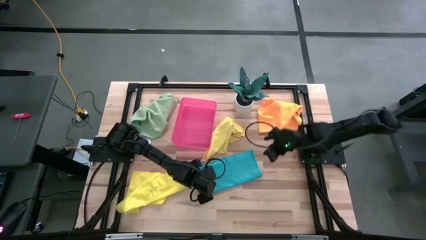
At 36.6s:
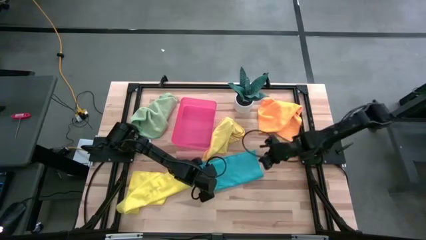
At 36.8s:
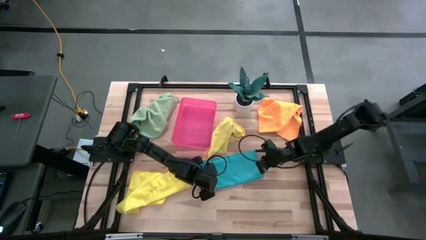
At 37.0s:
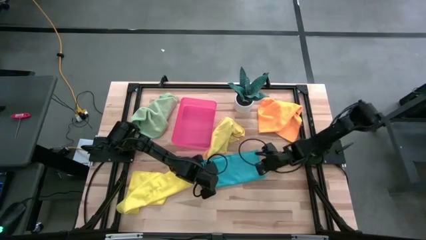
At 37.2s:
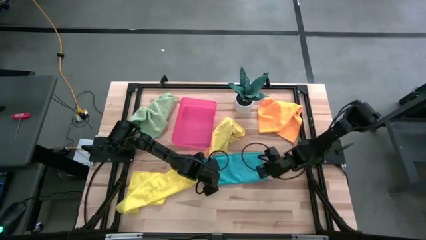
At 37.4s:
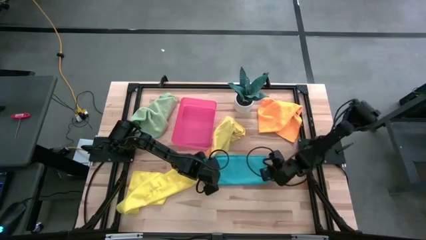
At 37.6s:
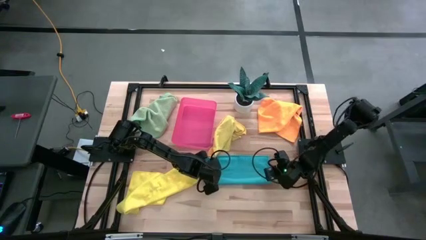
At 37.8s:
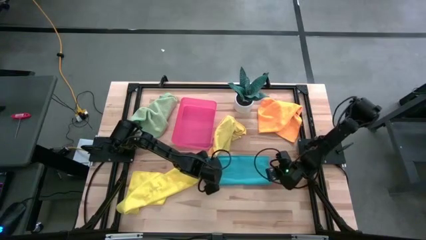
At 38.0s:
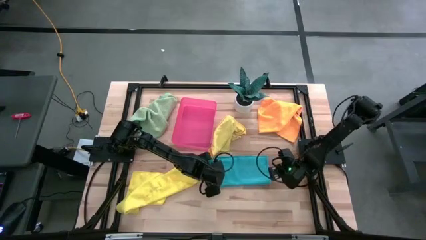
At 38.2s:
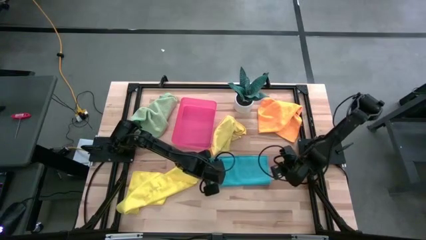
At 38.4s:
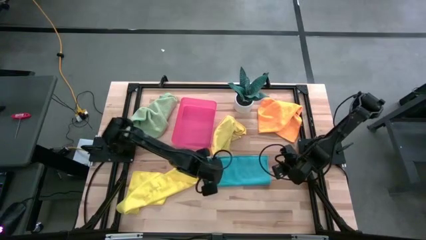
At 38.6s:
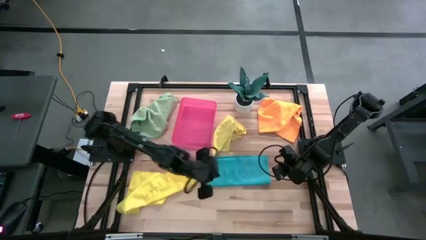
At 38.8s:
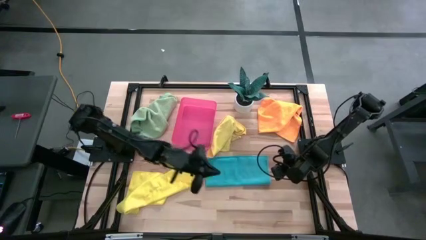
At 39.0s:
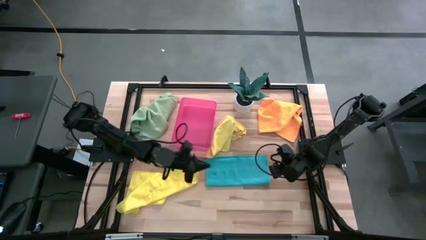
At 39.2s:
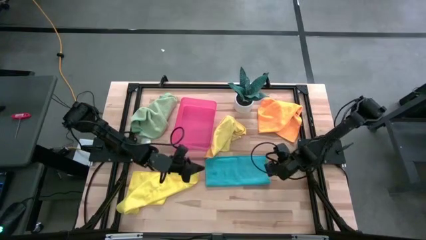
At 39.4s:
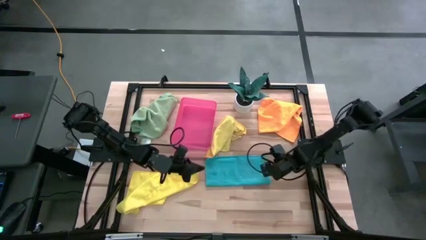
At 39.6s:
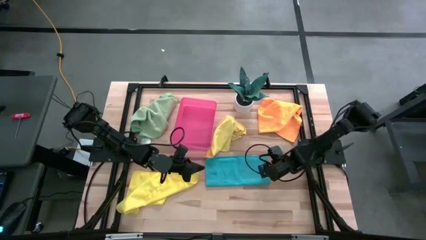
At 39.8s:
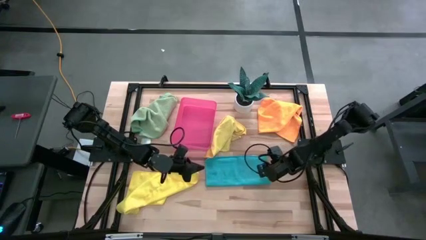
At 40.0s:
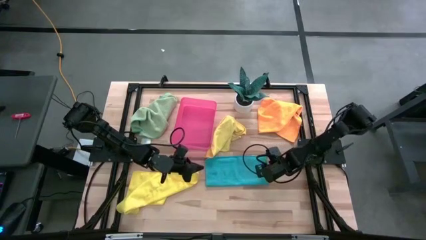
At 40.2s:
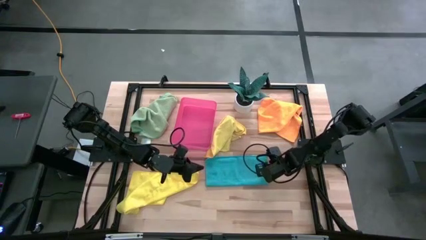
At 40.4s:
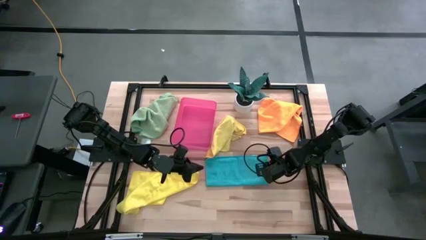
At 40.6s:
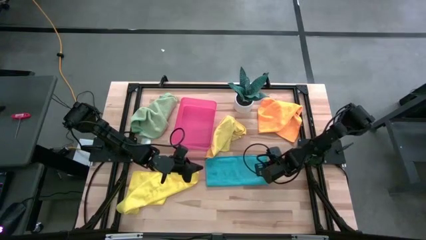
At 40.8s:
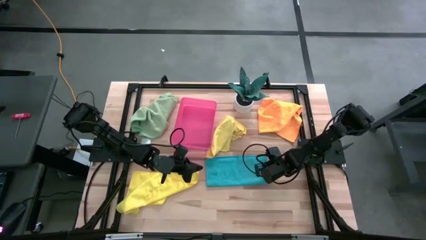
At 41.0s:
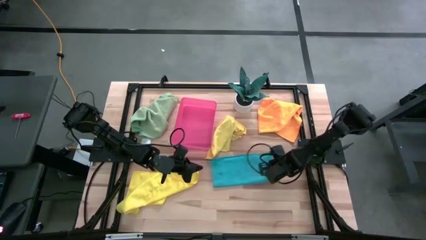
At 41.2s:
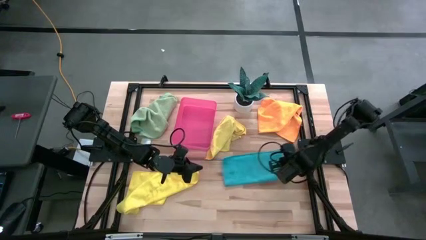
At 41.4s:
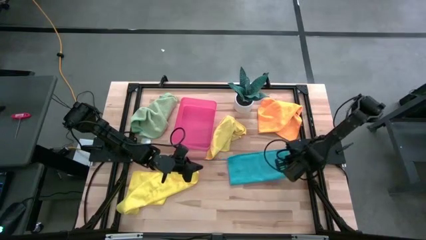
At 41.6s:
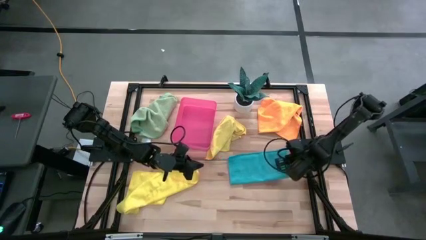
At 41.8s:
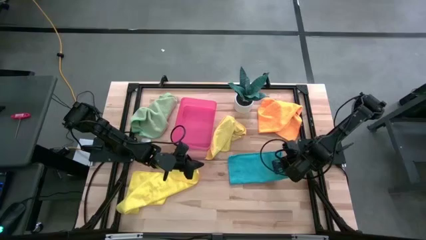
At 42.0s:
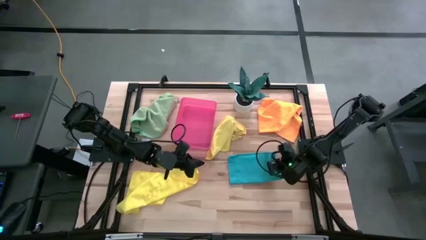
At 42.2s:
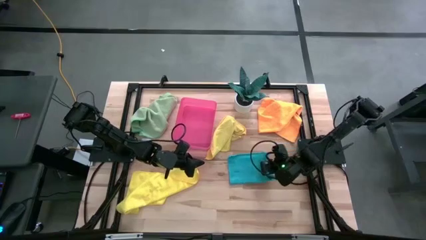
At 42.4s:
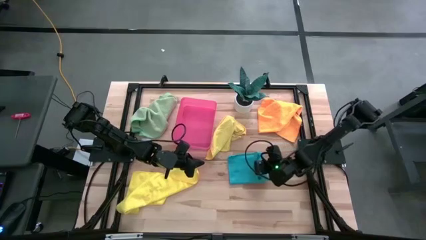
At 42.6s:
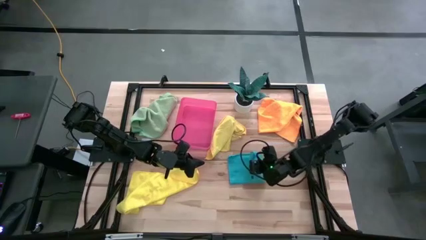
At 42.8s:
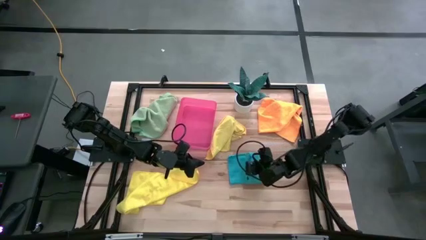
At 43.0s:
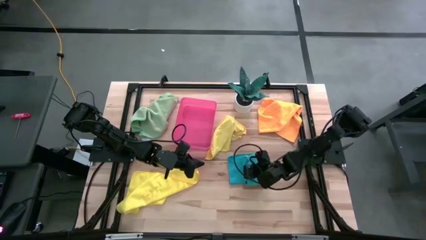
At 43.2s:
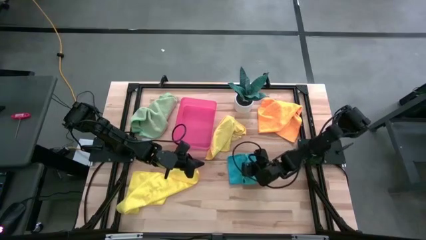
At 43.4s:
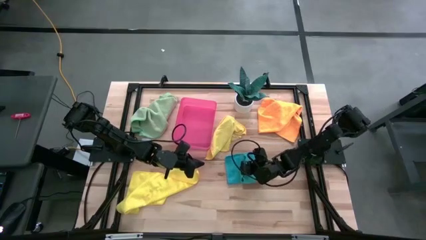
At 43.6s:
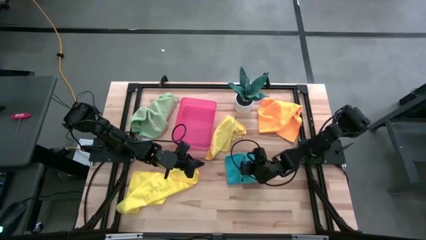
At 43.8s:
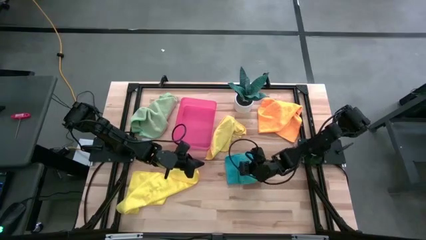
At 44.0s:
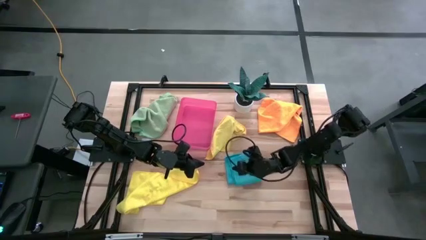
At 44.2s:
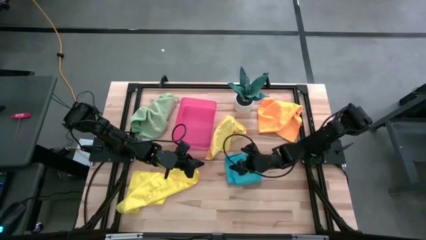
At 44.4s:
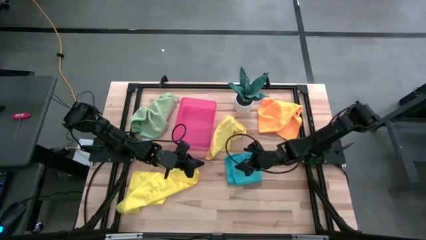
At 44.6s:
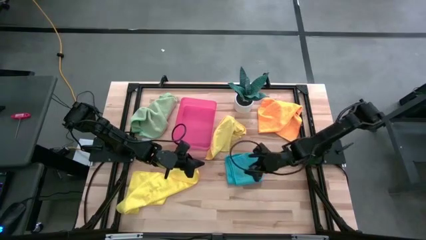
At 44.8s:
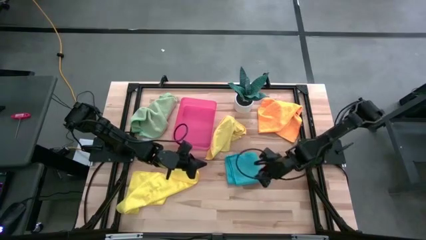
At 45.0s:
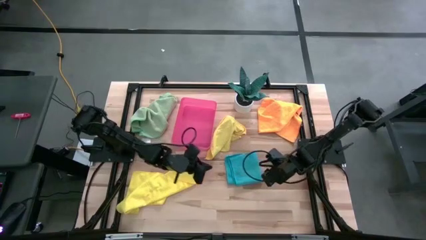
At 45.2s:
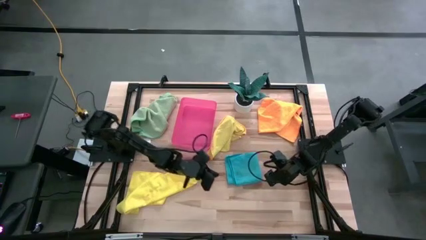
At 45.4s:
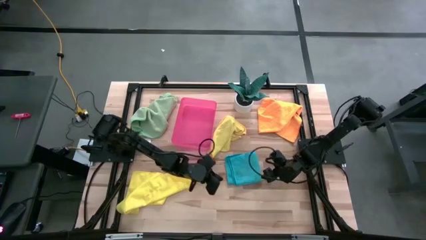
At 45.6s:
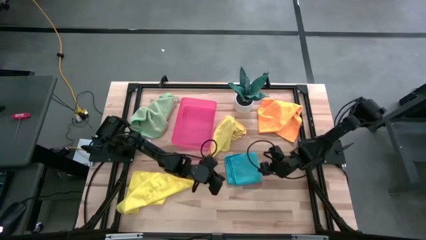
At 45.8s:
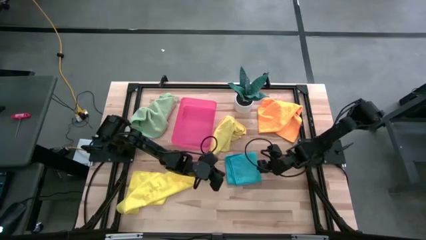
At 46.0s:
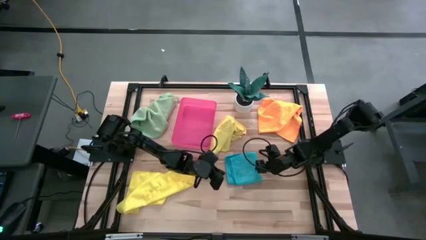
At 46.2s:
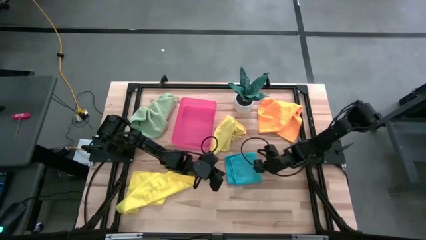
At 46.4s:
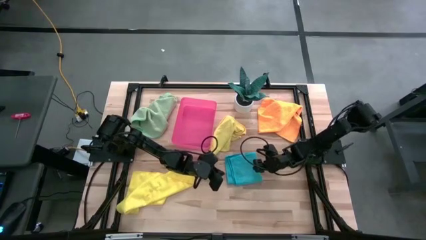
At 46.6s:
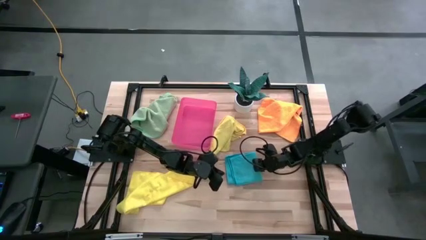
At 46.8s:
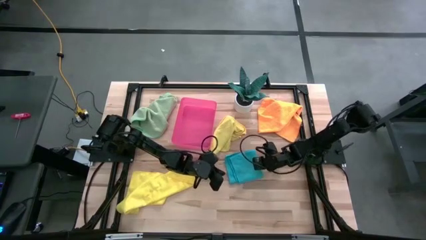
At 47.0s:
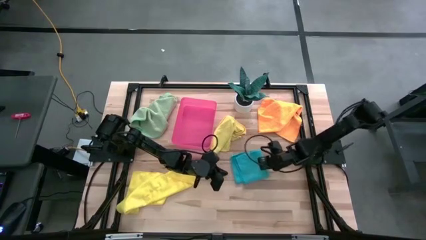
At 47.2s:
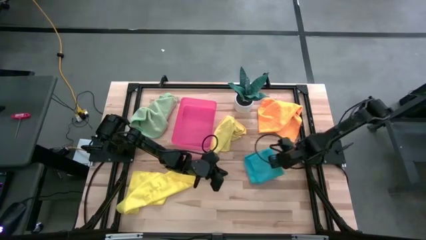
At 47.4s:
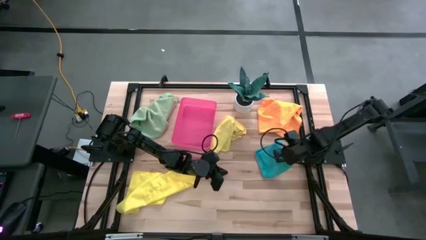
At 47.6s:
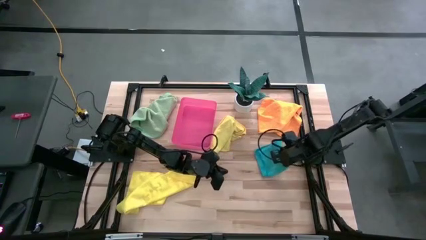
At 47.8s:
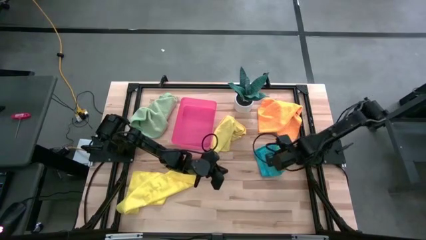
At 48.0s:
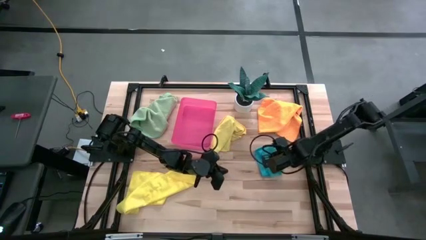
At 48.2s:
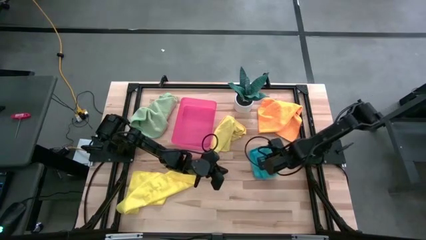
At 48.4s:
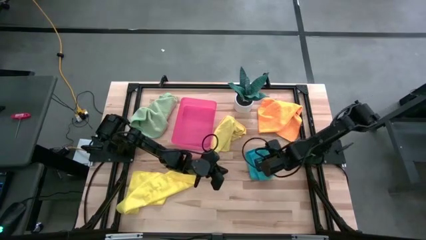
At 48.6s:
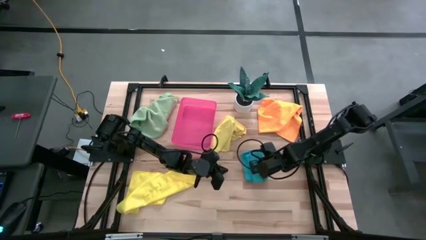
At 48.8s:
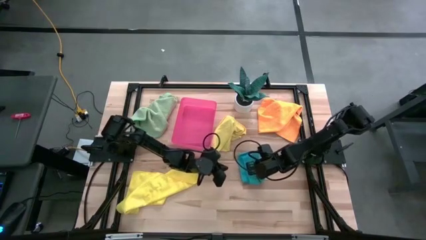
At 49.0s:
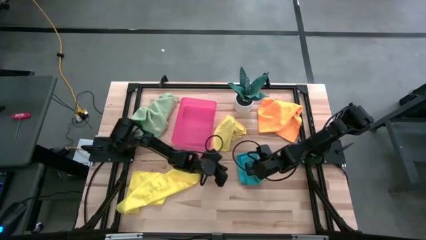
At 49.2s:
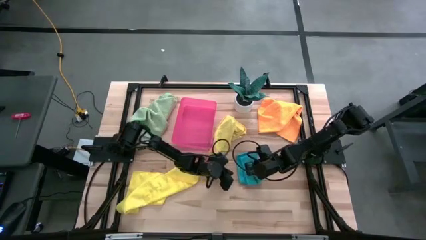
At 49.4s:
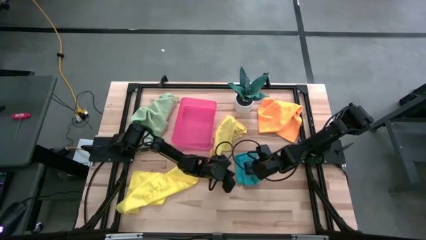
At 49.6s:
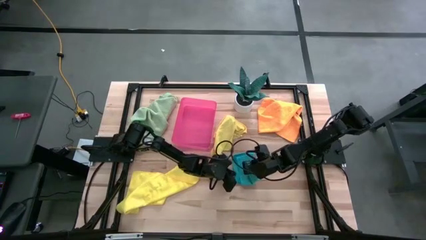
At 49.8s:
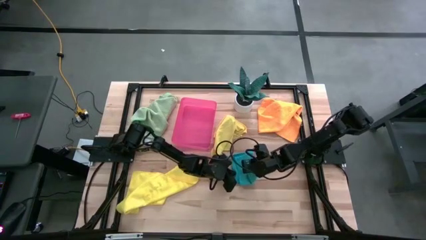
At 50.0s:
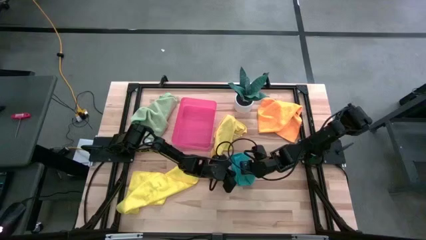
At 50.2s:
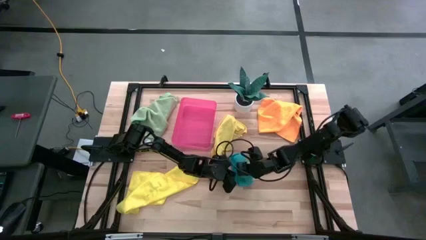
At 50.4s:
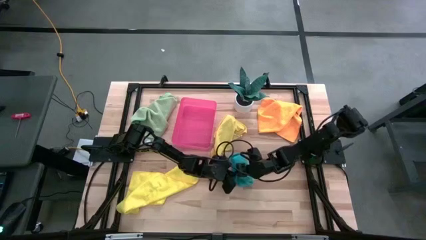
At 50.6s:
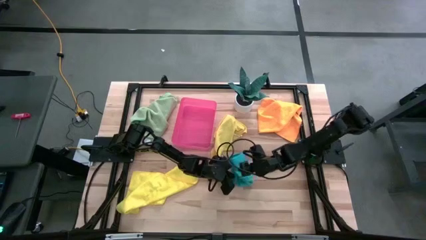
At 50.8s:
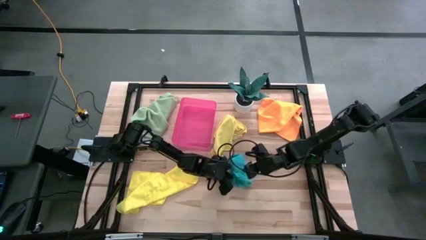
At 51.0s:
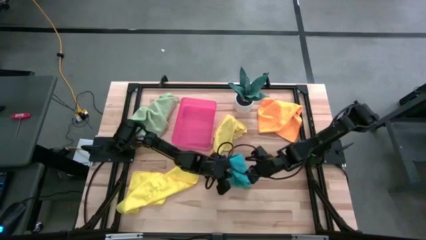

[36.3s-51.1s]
Task: Fold microfiber towels
Fold the blue microfiber cloth

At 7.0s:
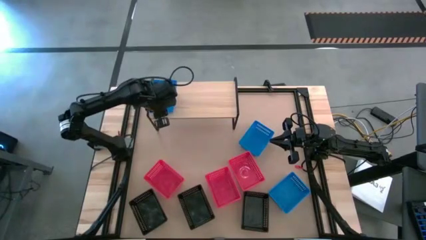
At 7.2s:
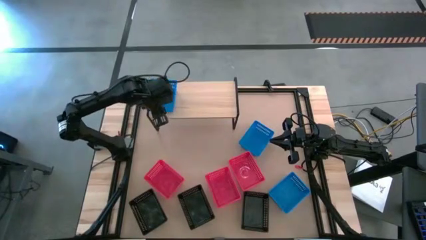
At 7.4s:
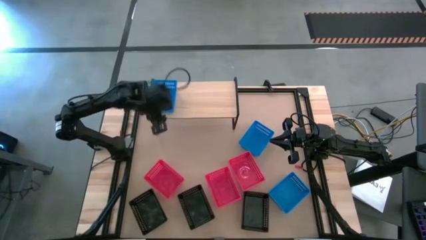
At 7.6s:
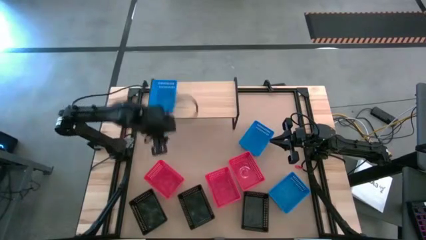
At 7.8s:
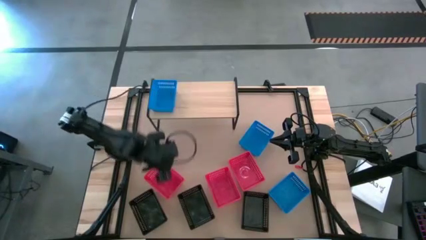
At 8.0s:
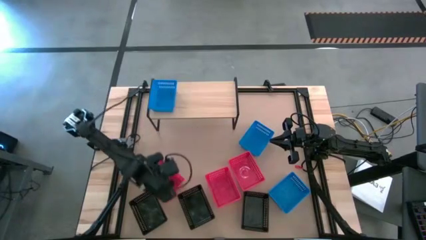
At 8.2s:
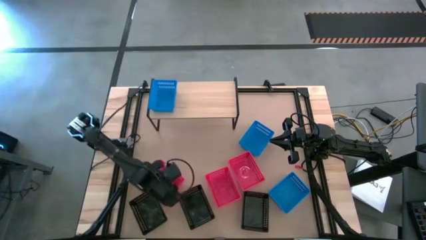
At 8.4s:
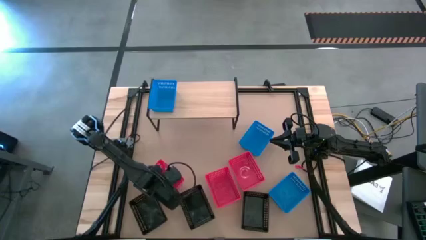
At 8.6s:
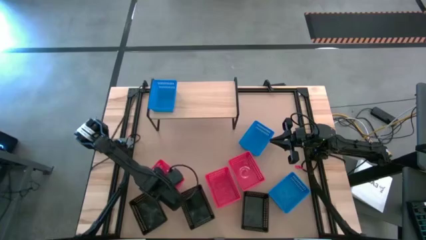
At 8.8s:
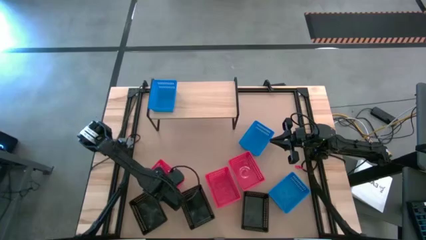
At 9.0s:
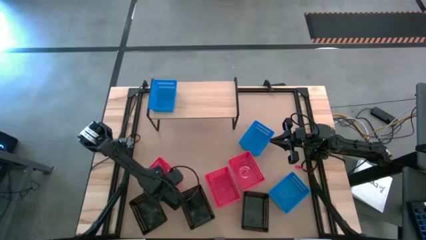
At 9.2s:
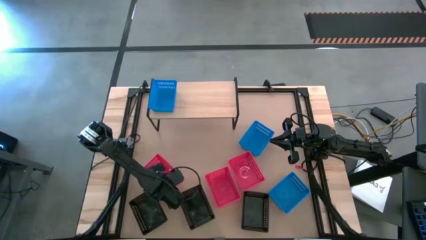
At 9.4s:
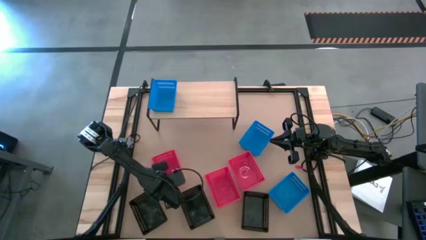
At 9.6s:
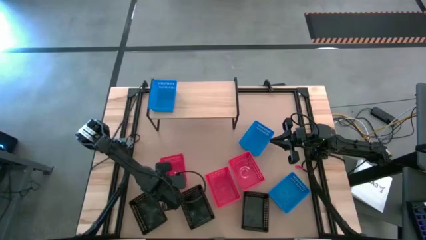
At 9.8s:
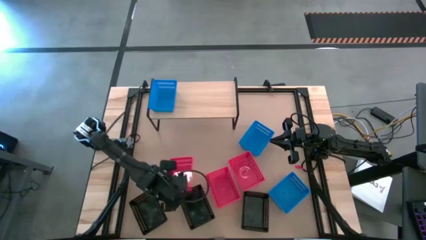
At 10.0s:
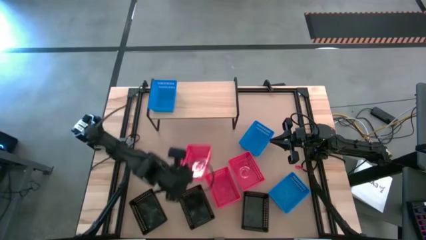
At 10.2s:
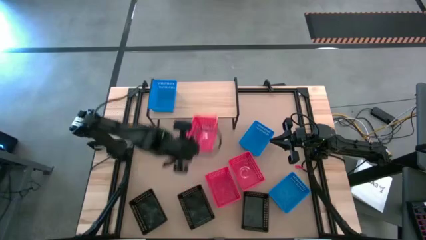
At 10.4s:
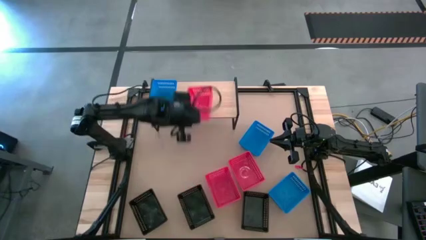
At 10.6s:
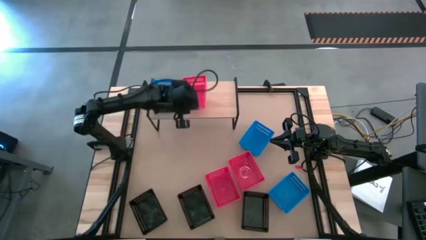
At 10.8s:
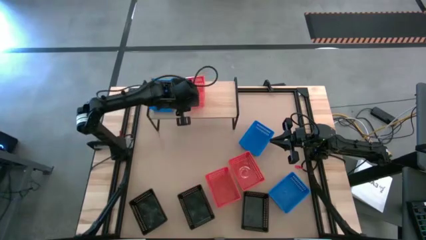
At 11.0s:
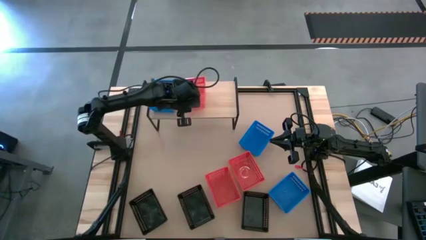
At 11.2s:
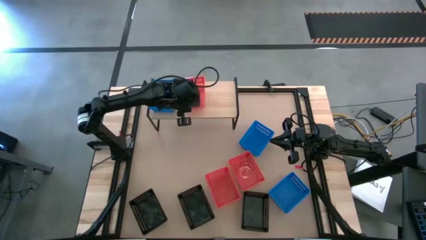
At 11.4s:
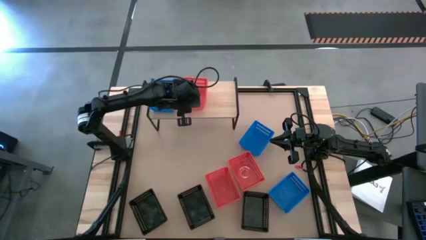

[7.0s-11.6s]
Task: Stack baskets on shelf by color
Put the left red bin on the shelf
